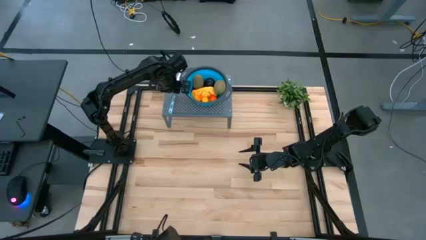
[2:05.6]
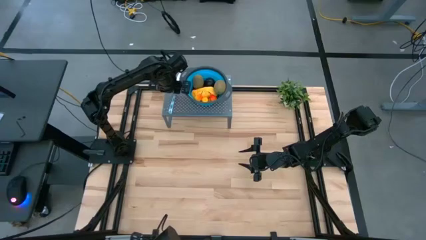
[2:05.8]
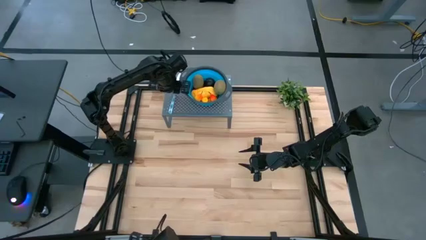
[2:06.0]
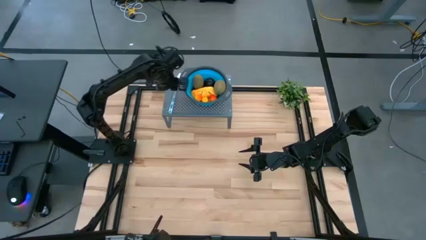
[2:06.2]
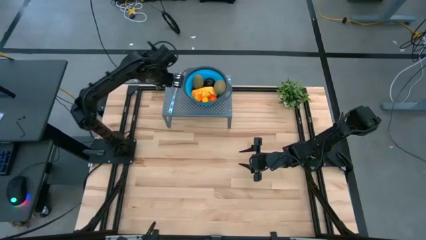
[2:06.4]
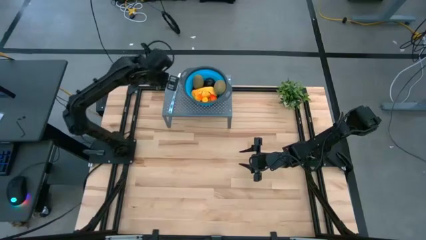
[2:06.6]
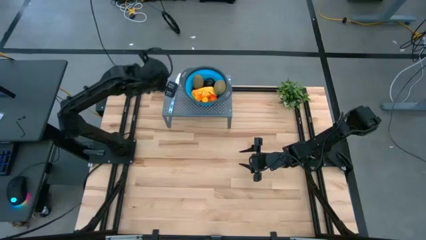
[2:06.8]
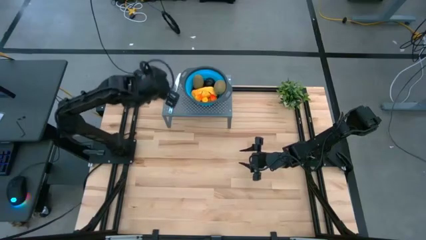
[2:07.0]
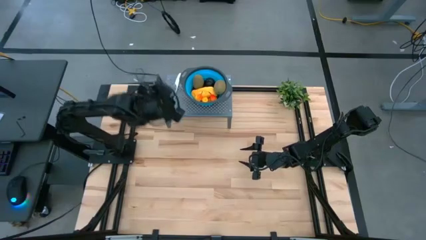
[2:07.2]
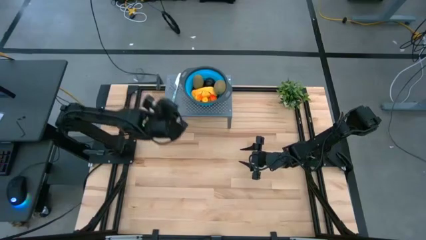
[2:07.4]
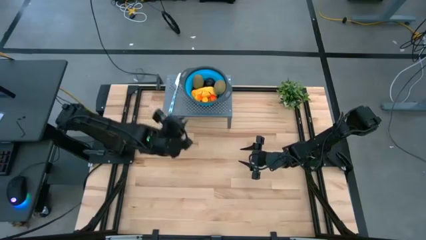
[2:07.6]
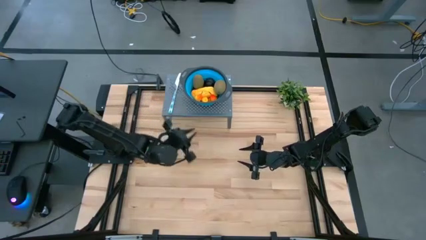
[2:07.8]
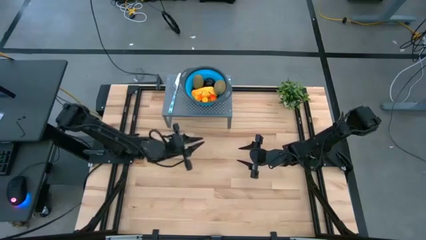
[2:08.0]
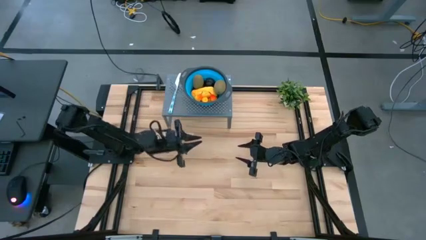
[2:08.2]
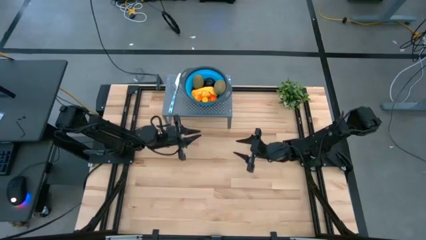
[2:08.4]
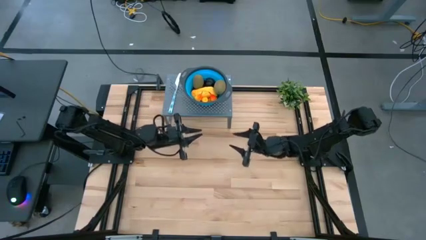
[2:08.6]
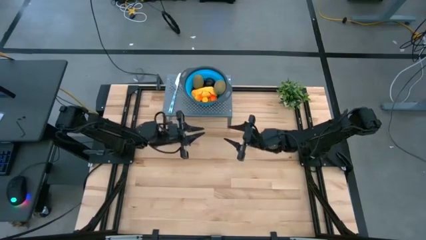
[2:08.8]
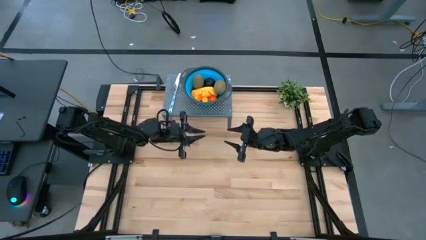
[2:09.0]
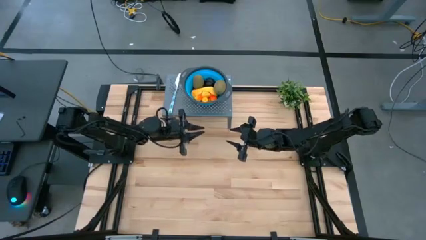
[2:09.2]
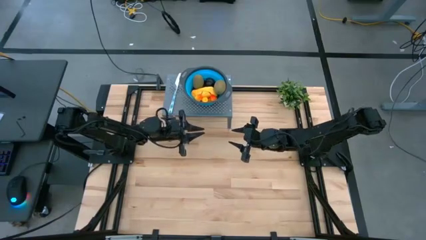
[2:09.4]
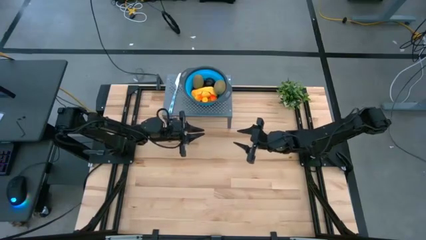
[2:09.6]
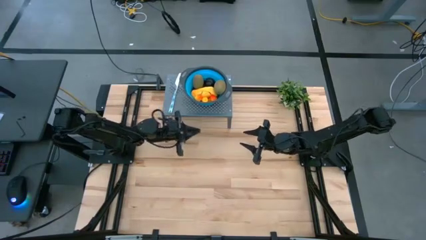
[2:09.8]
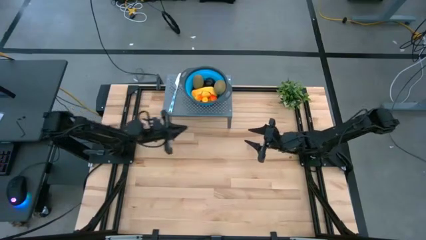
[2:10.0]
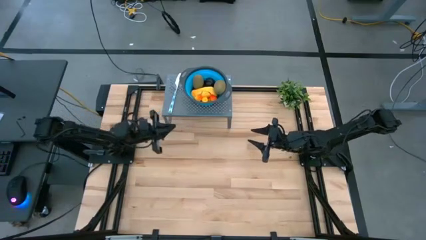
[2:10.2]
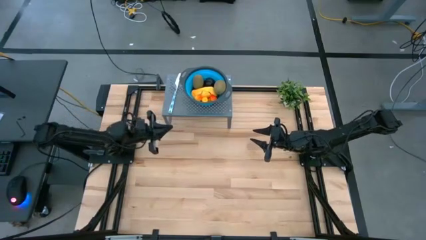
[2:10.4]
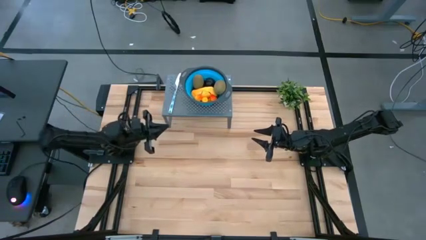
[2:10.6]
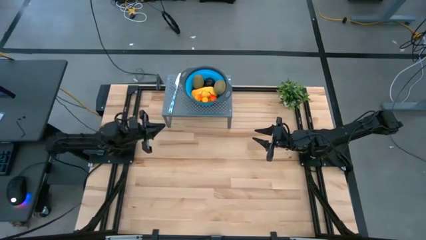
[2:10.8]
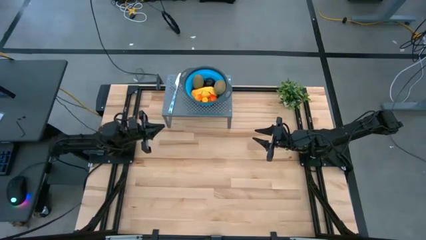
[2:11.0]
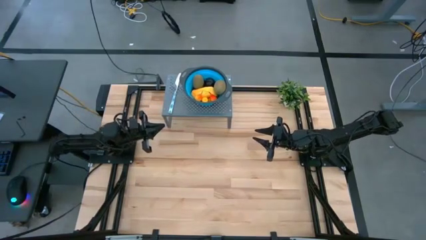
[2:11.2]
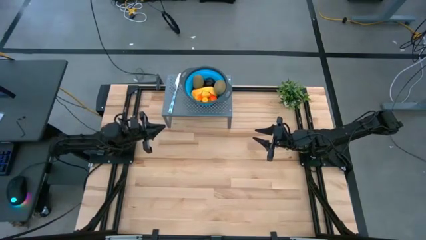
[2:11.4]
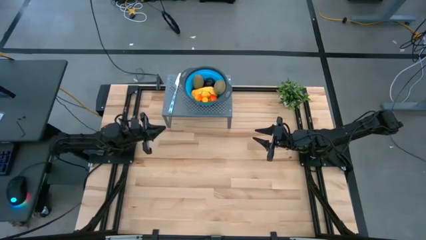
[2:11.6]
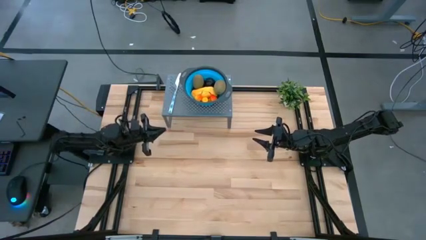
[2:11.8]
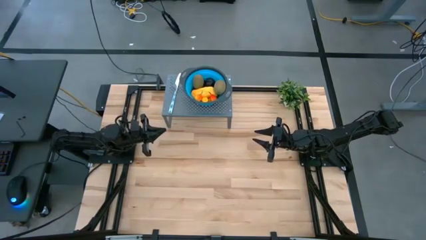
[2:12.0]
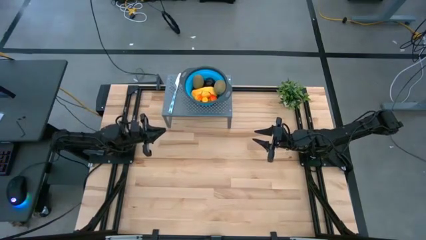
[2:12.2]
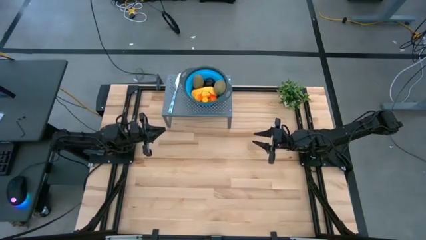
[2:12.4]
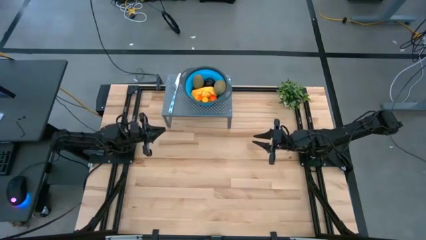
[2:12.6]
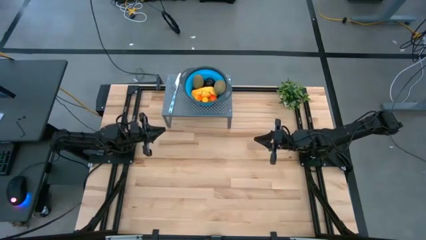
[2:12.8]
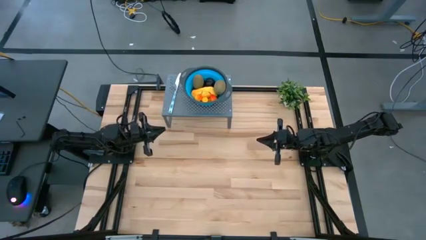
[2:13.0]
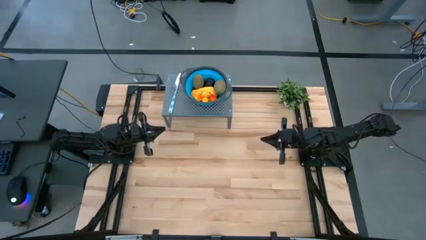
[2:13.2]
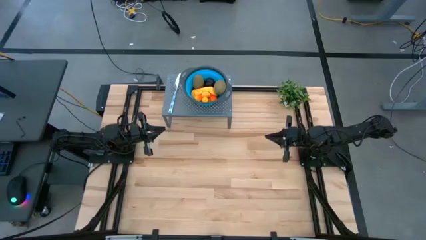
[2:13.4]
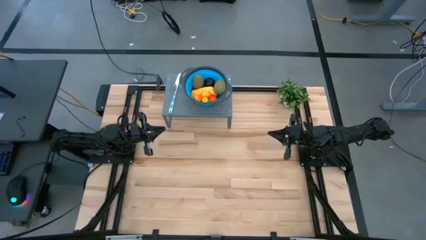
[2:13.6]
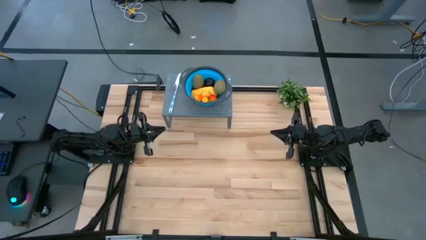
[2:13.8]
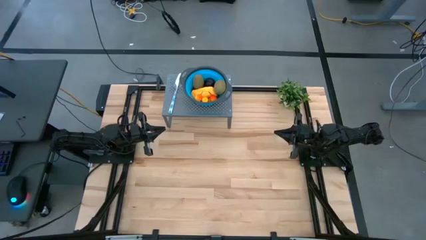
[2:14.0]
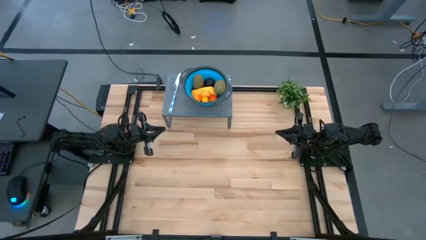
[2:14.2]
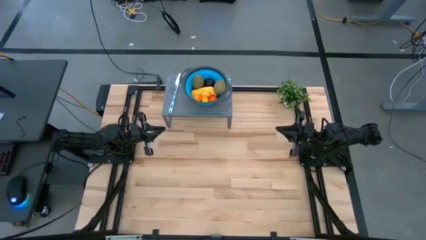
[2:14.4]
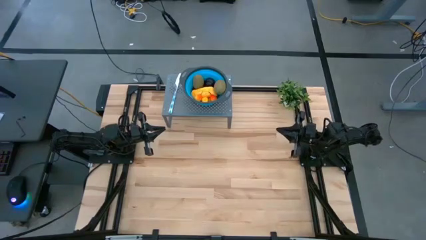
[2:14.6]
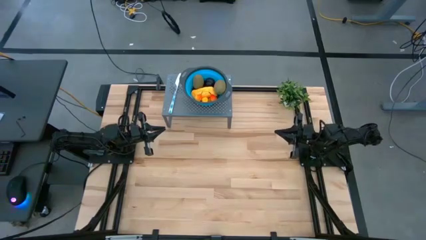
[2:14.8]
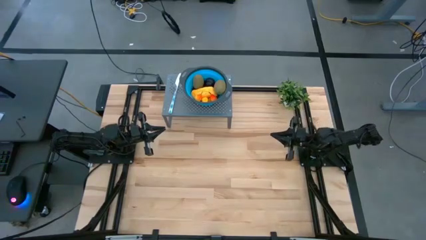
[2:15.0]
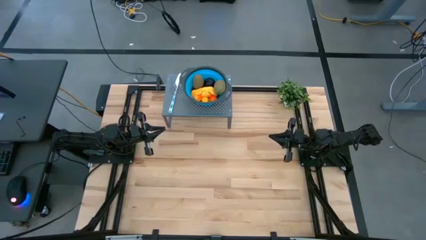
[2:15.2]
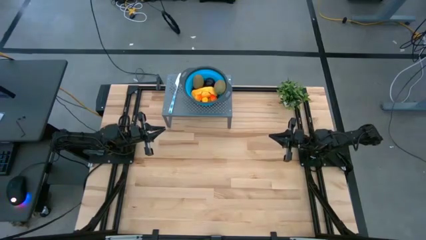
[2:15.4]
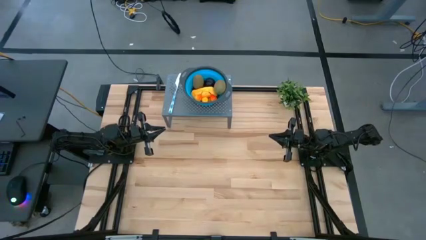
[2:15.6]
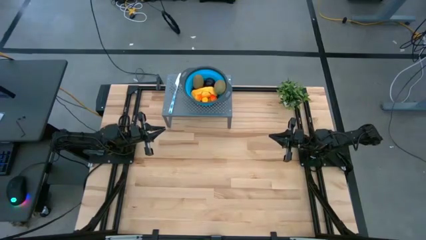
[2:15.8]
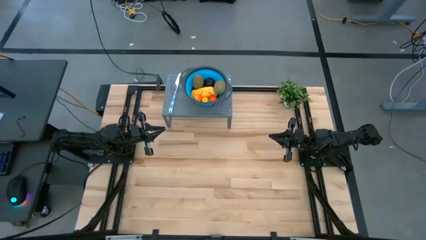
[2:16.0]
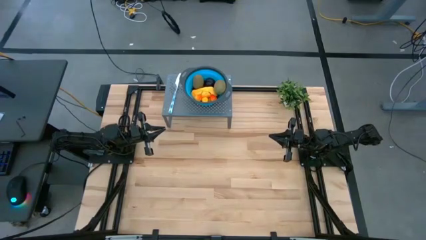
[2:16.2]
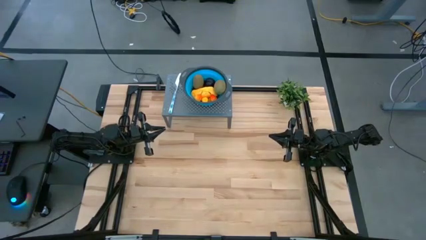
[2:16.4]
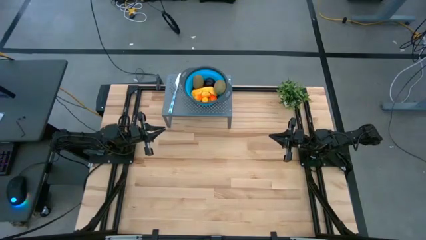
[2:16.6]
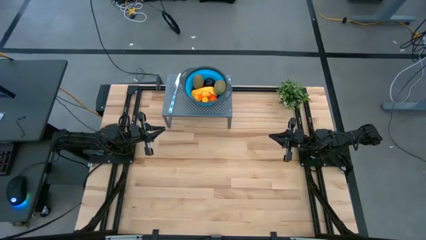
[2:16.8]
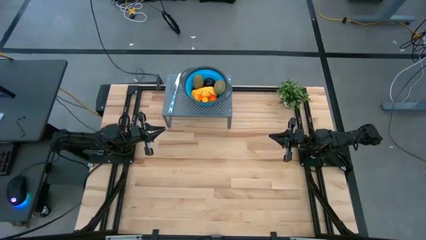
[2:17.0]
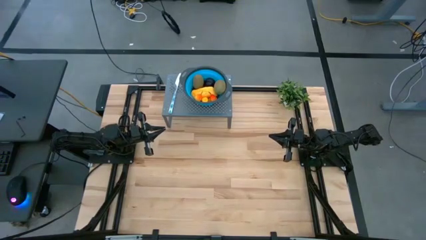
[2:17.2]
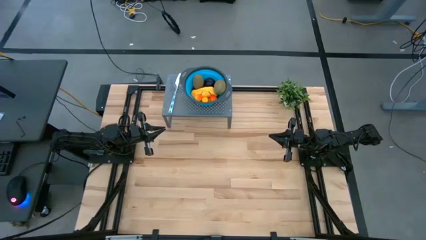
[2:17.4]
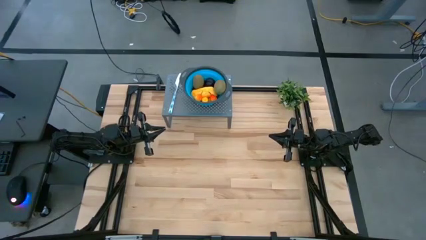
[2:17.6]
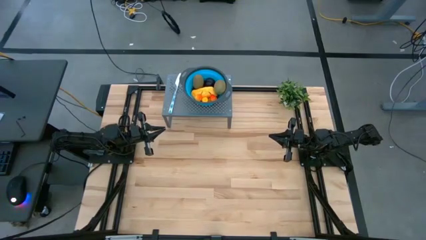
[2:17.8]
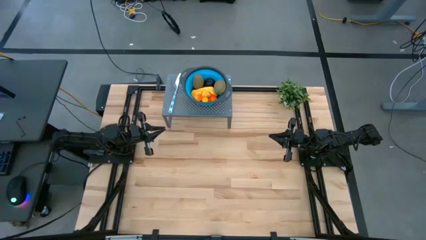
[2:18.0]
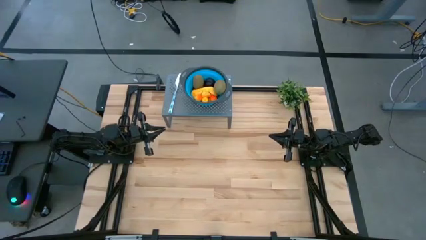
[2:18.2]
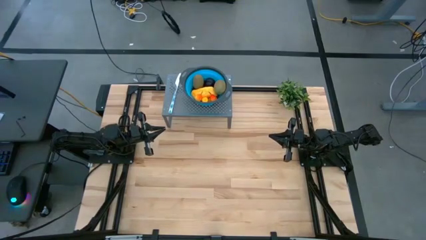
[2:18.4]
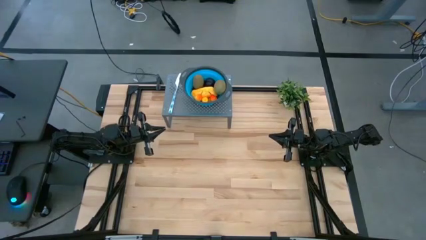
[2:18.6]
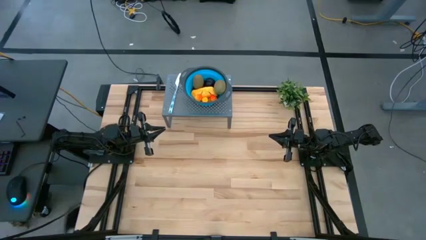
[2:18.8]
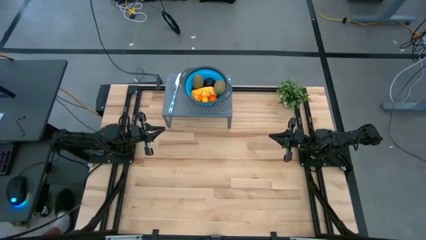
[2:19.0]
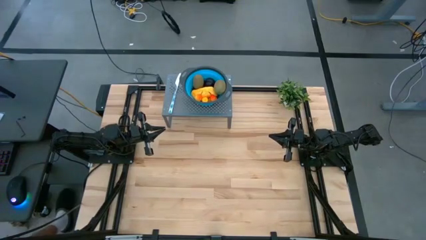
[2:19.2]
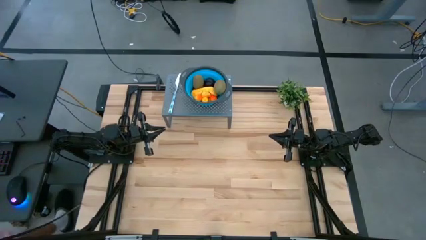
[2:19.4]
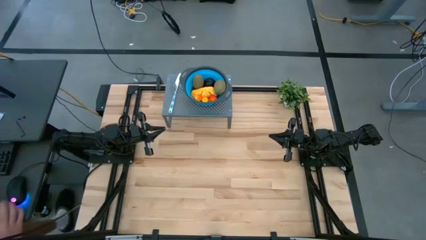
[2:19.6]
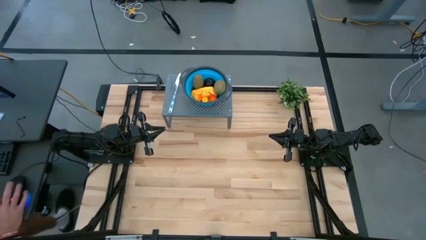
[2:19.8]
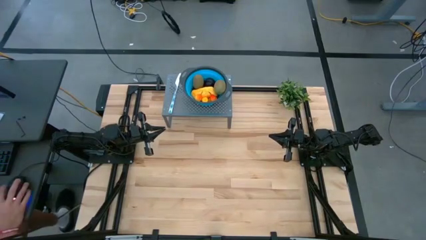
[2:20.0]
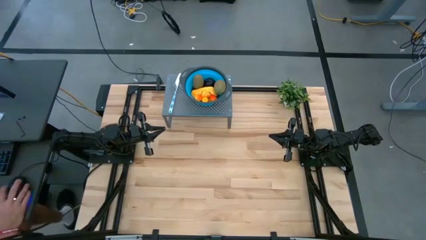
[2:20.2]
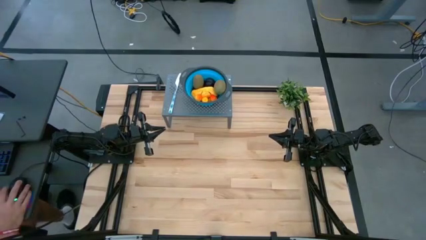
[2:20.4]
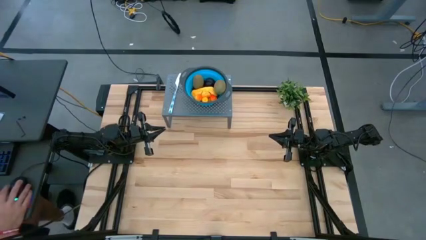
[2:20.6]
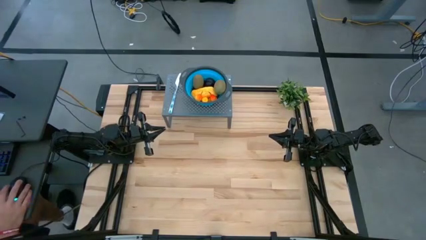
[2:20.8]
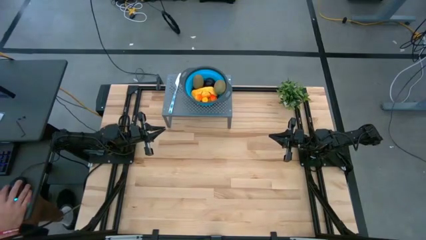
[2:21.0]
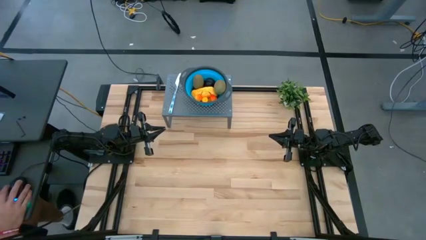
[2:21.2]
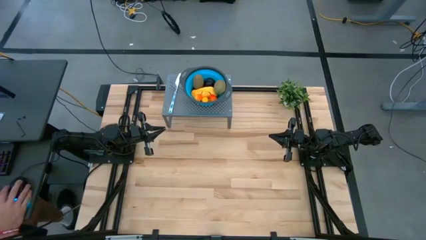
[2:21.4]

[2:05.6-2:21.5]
Task: Pick & Place Fruit
Return to Home Position
